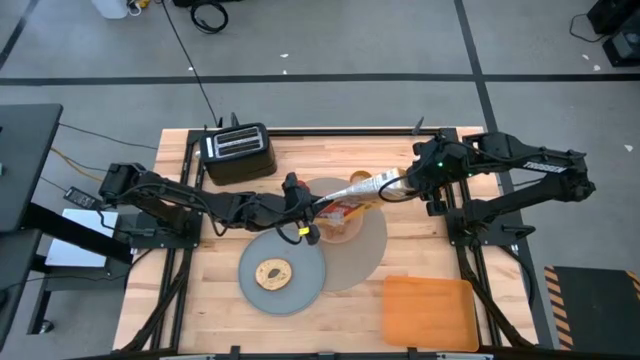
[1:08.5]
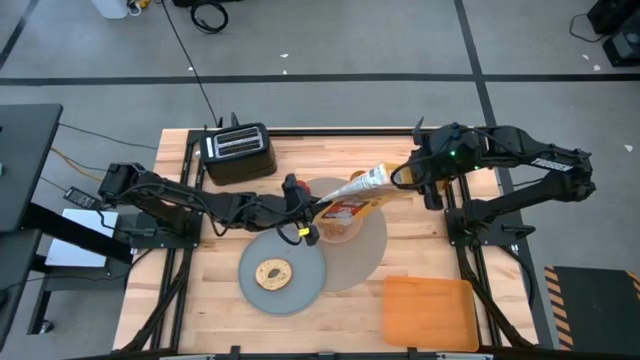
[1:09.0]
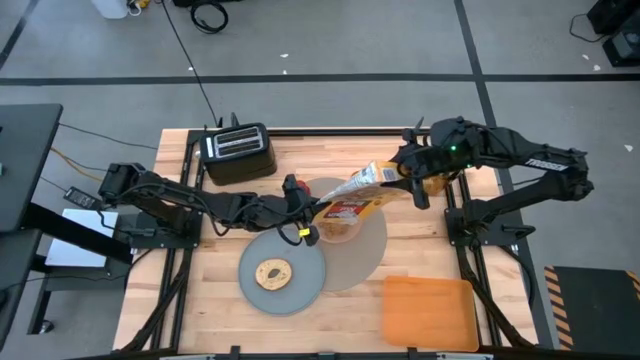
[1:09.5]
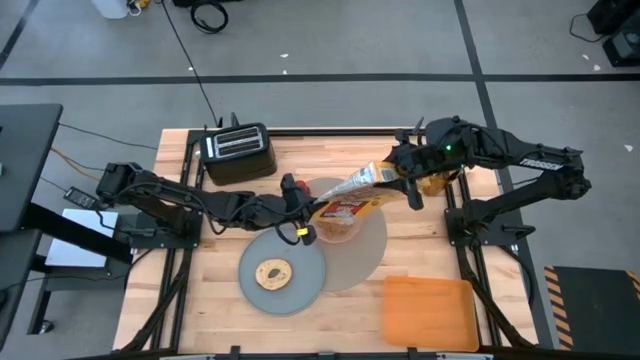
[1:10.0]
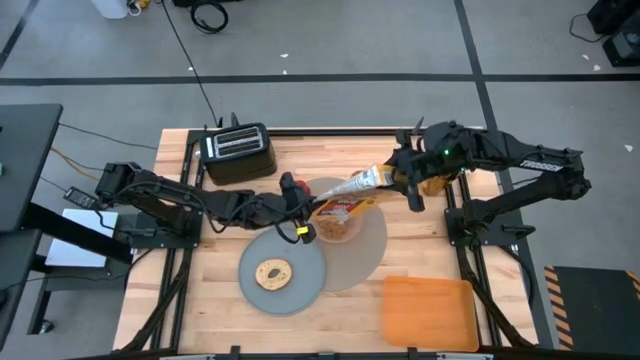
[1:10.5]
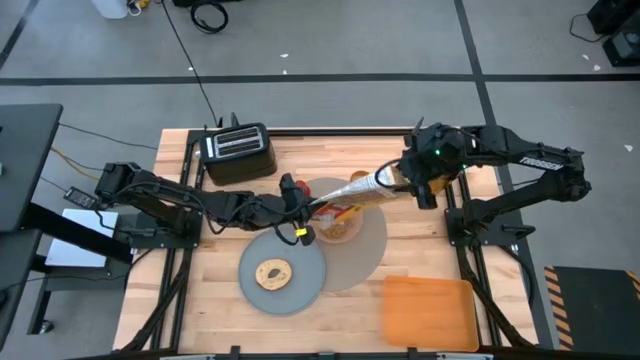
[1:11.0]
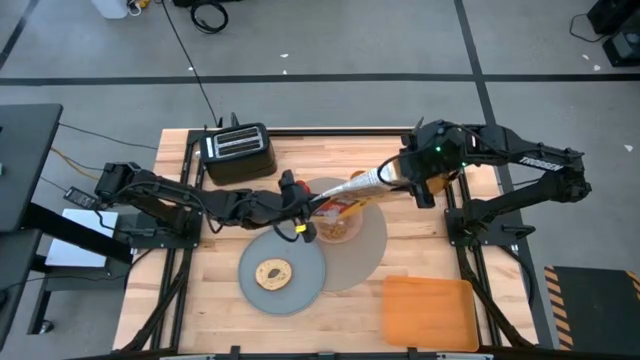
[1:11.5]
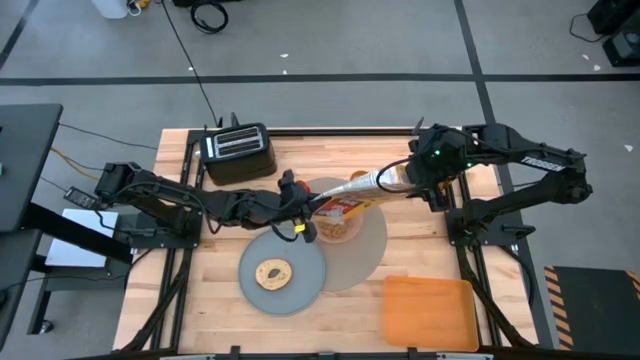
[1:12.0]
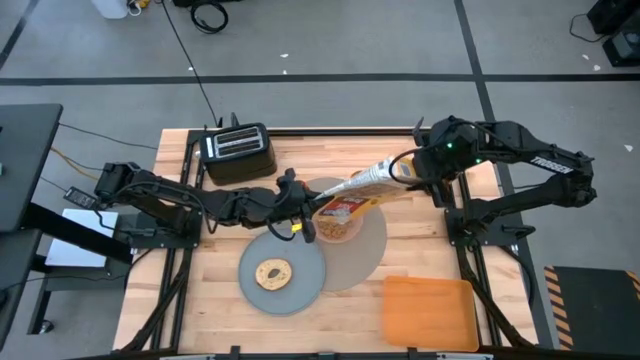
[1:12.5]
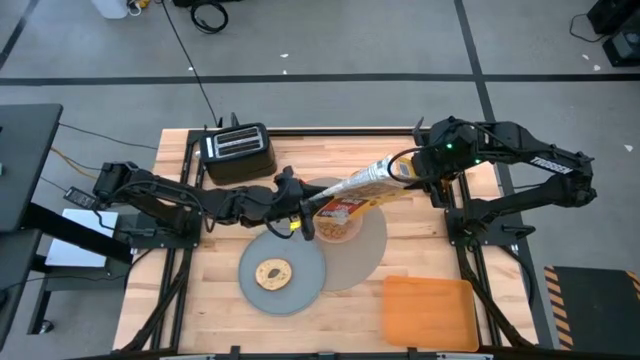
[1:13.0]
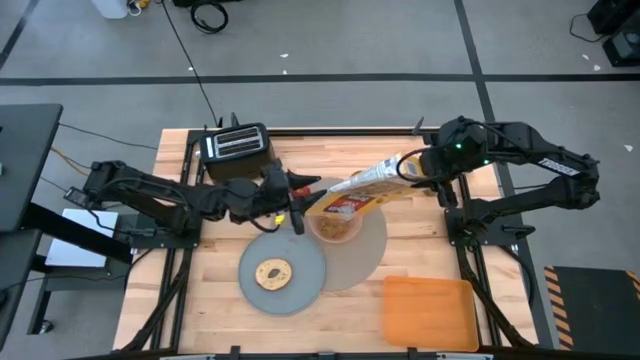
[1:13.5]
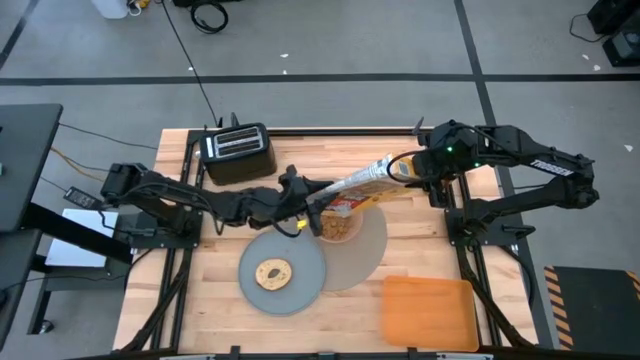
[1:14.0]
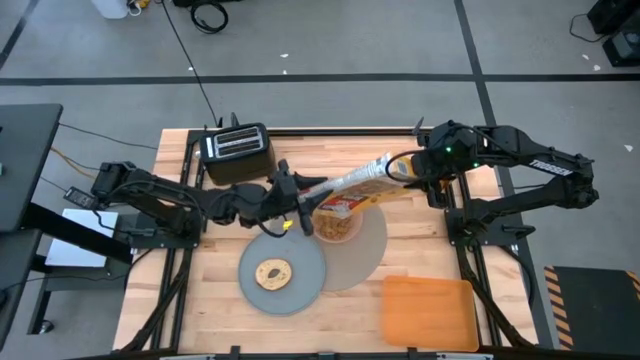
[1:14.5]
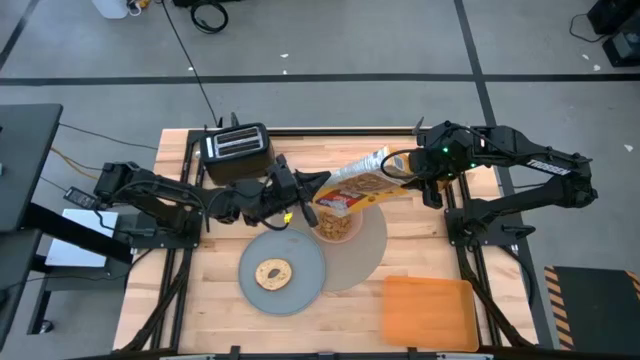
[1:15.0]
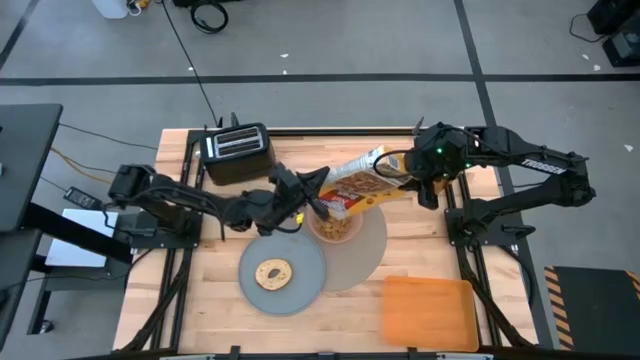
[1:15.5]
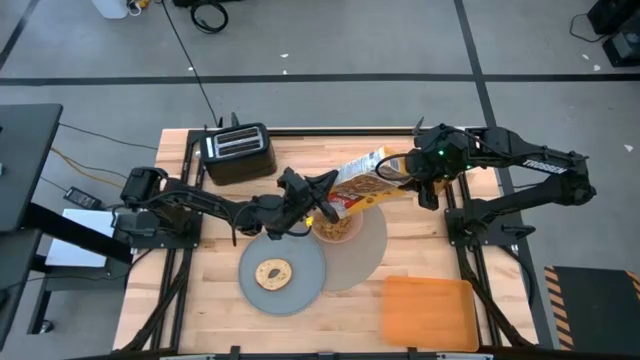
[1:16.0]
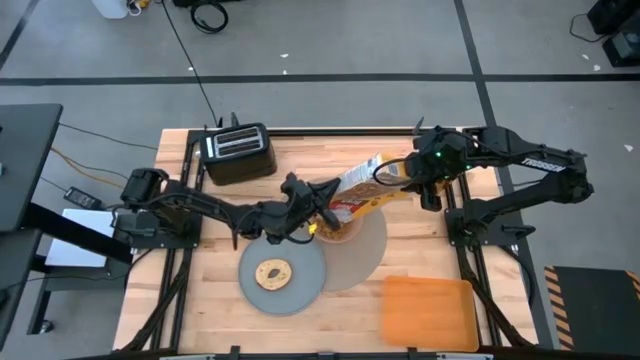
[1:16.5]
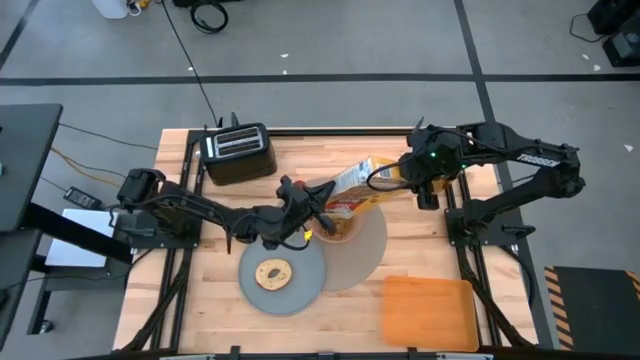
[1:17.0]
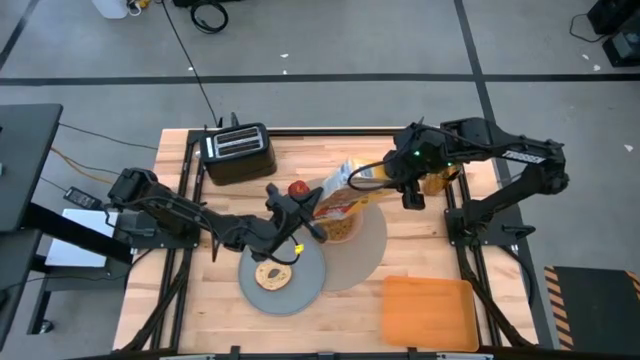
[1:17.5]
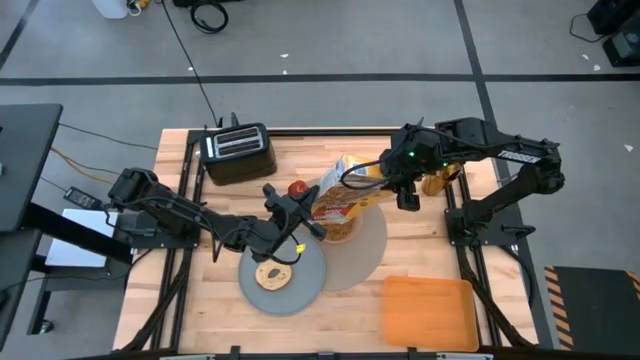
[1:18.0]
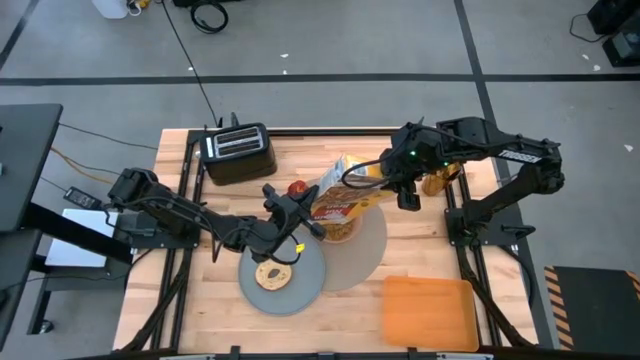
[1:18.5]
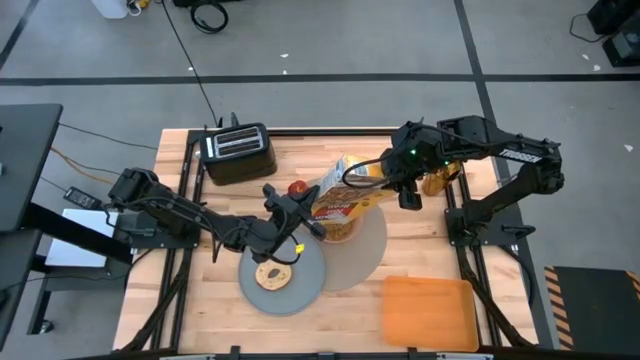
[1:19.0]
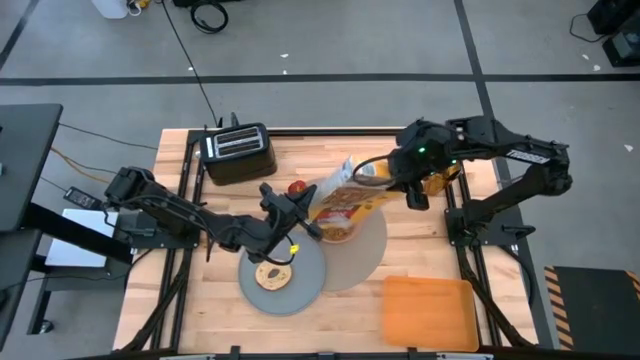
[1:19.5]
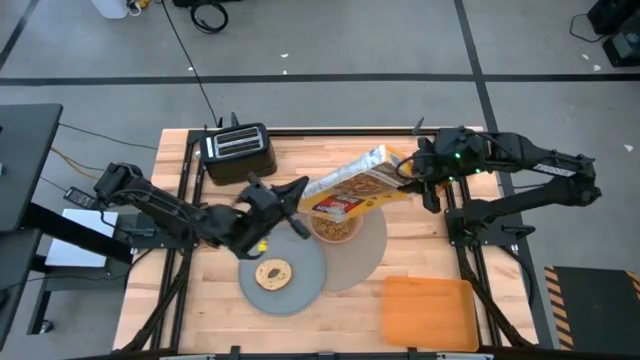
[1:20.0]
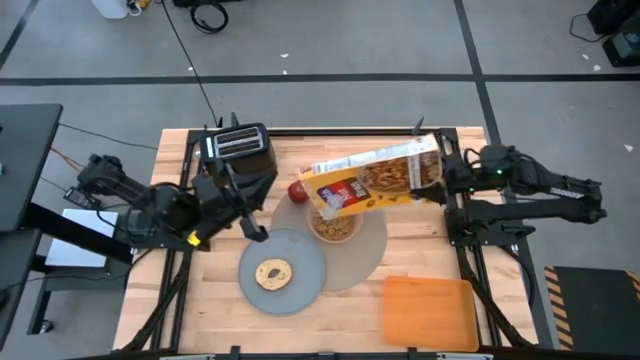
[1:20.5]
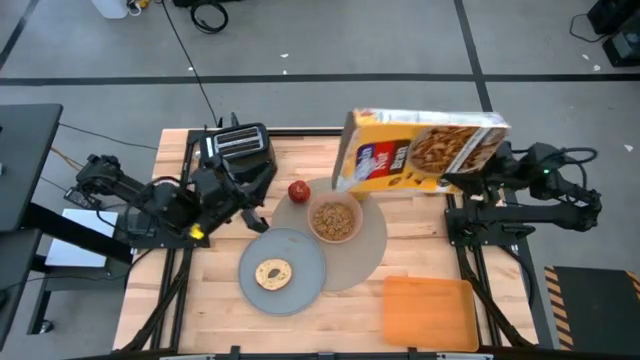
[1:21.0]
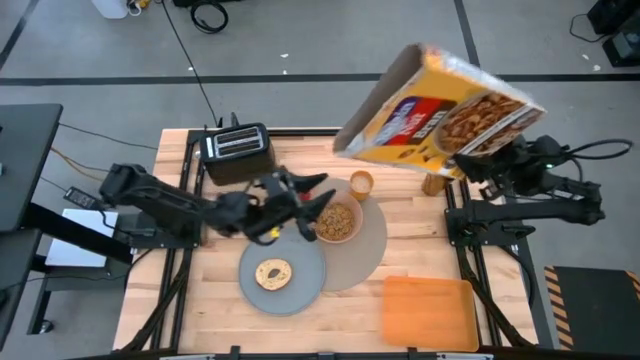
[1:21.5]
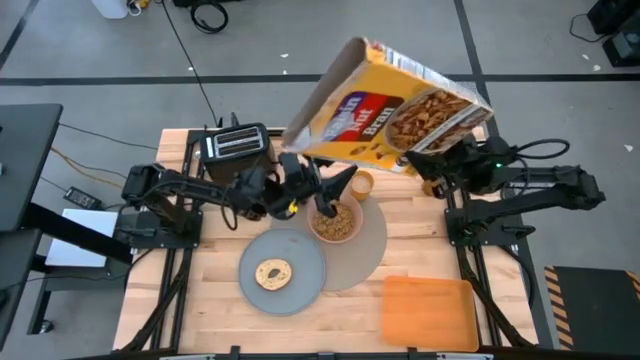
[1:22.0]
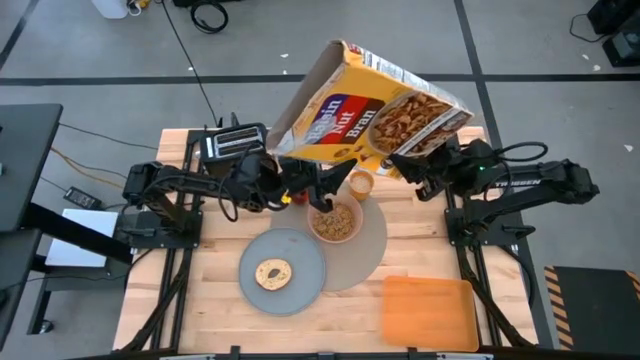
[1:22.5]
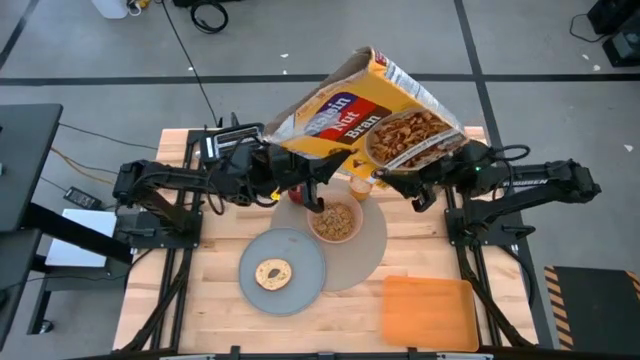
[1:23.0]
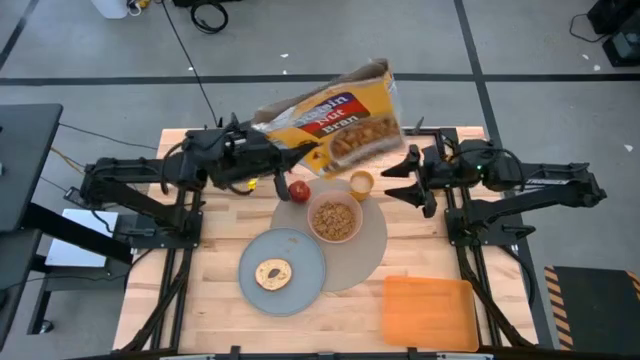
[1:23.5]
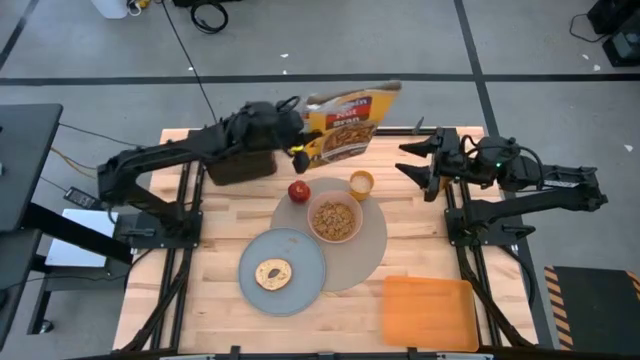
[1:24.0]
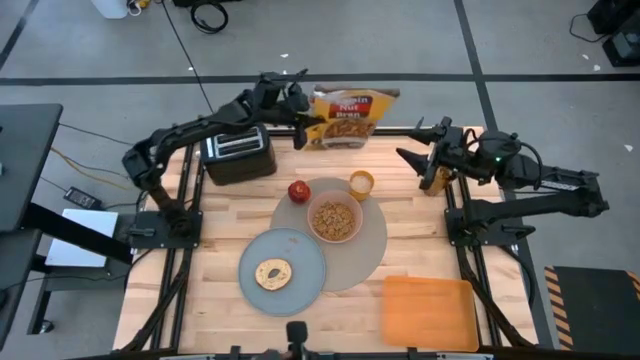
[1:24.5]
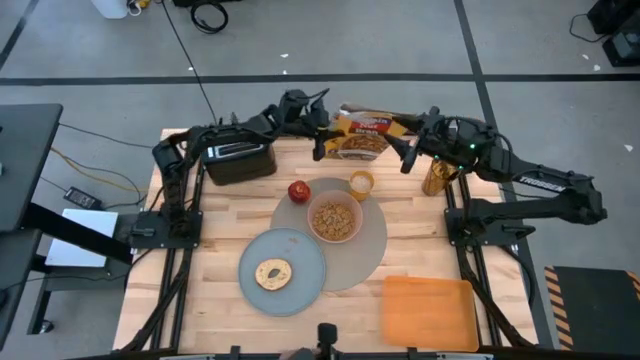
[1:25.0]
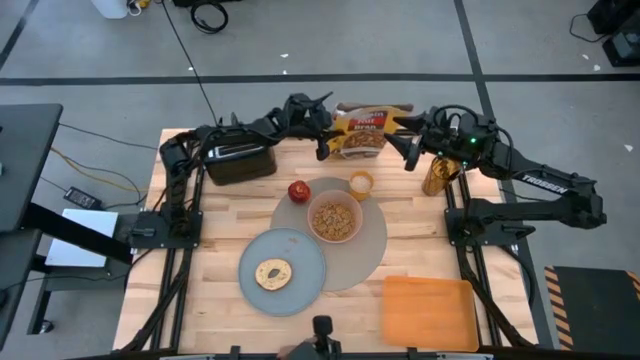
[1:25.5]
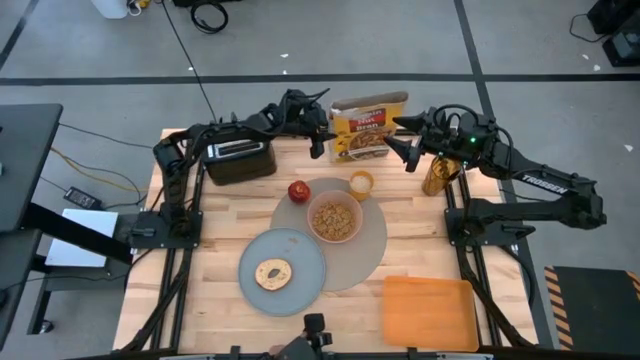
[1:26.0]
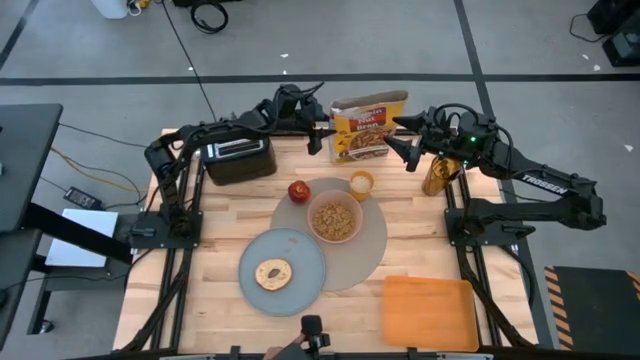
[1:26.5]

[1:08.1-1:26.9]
Task: Arrange a breakfast setting
Pour the cereal from the yellow cereal box into the orange bowl

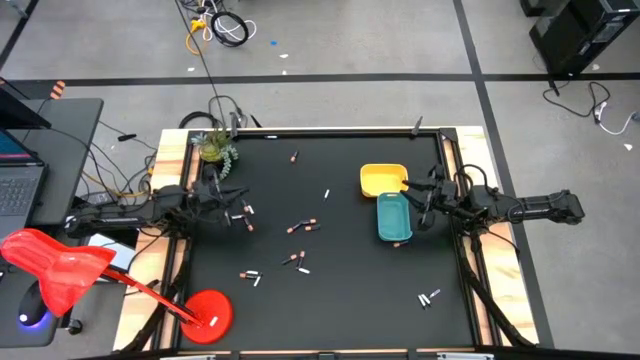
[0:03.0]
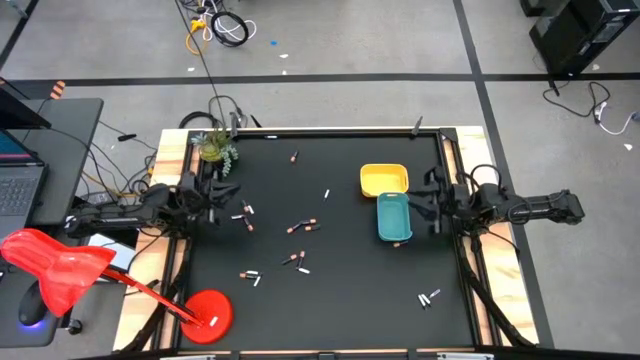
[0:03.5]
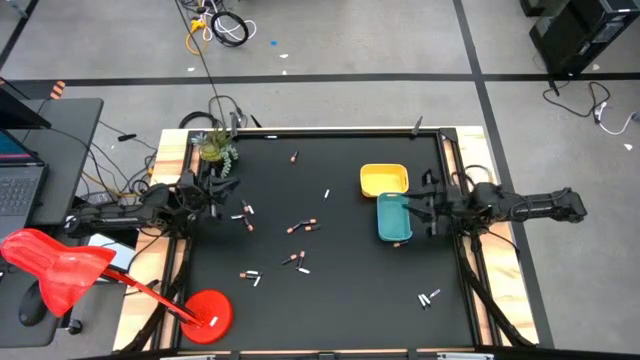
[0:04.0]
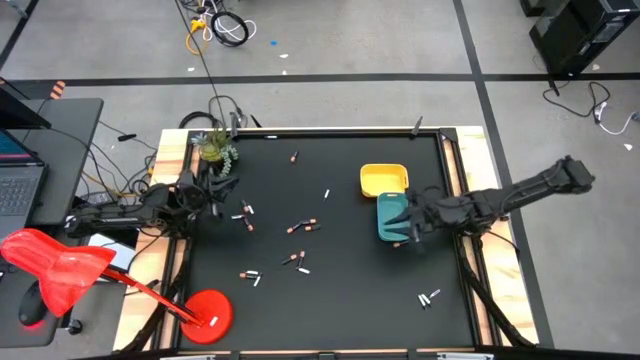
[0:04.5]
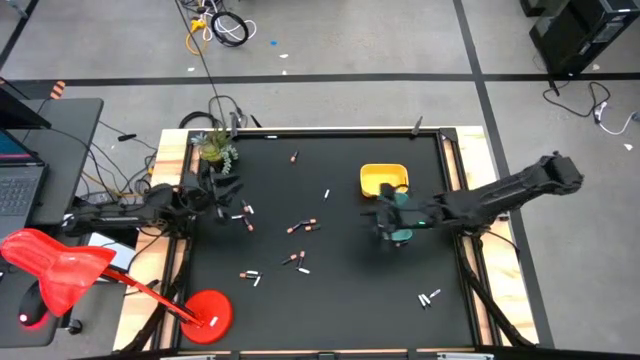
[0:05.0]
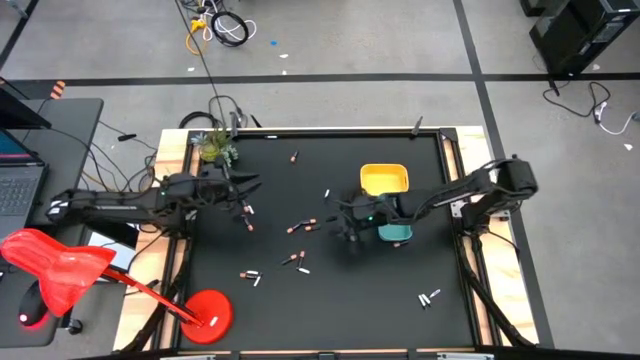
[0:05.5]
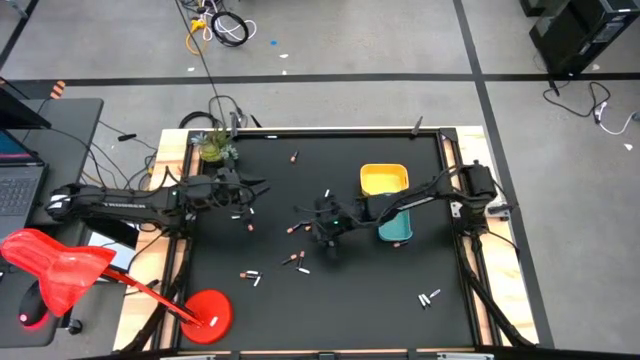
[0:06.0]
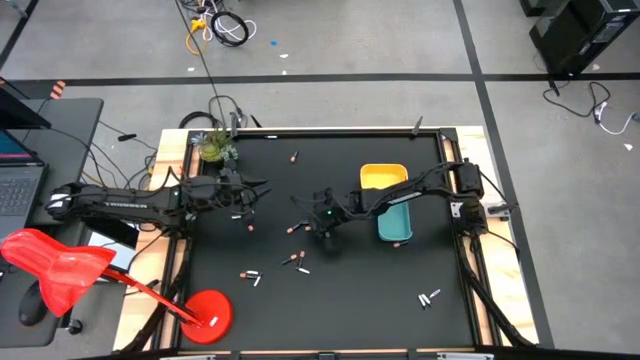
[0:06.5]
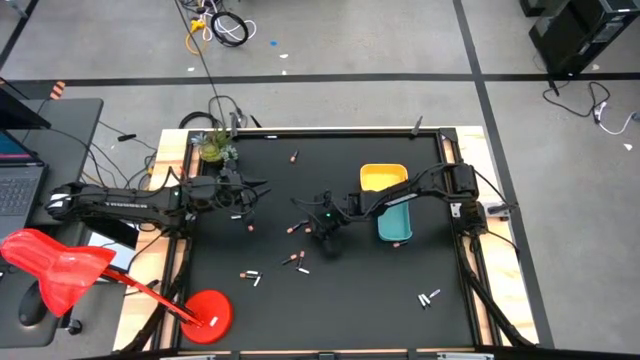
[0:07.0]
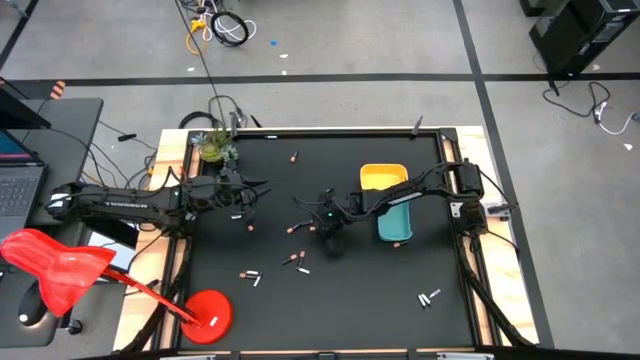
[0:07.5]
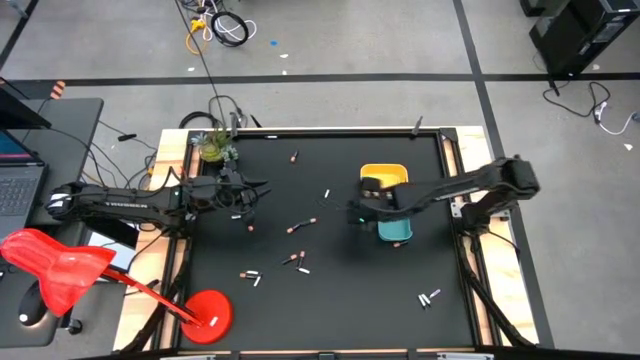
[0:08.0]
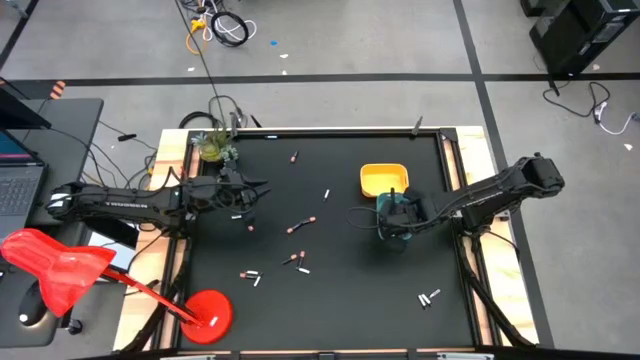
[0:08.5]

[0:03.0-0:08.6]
Task: Sort batteries
Put the gold black battery into the blue bin
